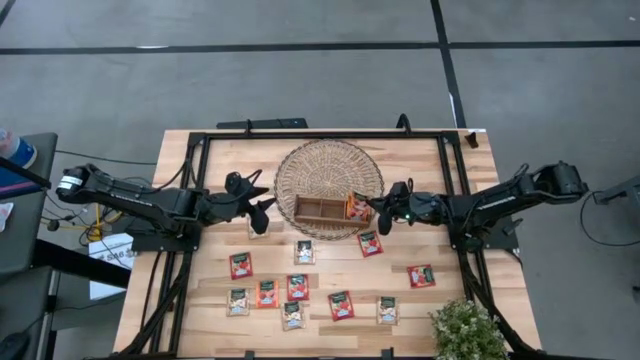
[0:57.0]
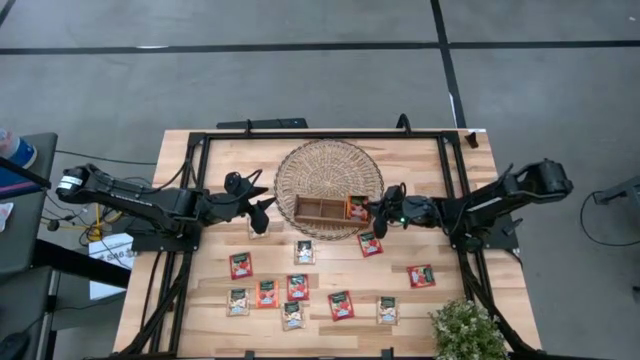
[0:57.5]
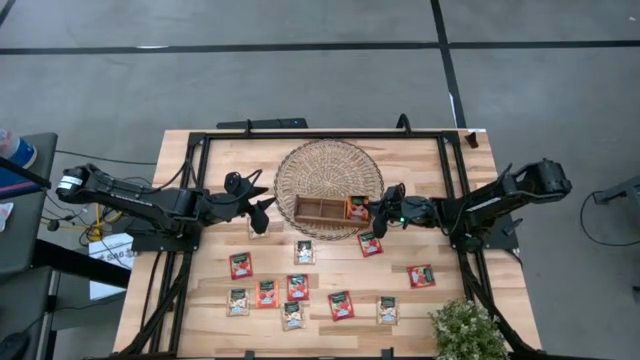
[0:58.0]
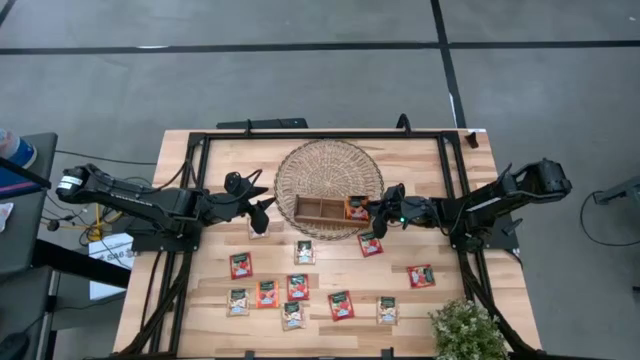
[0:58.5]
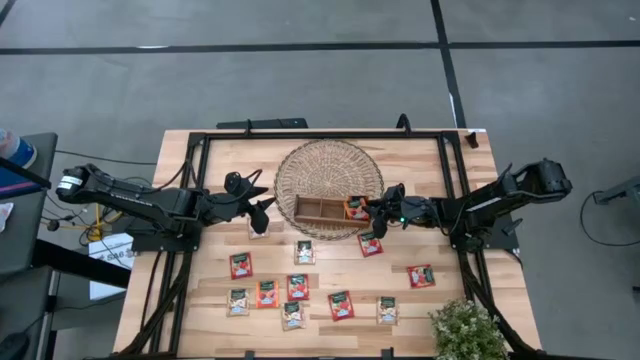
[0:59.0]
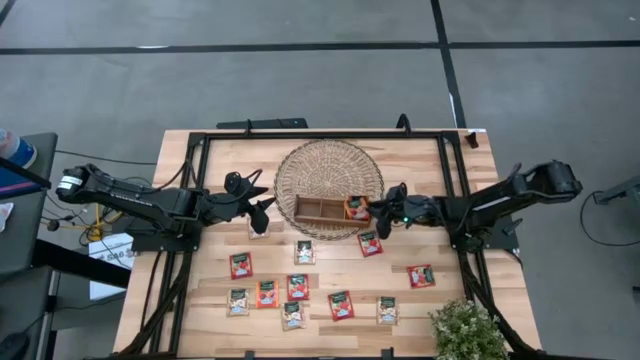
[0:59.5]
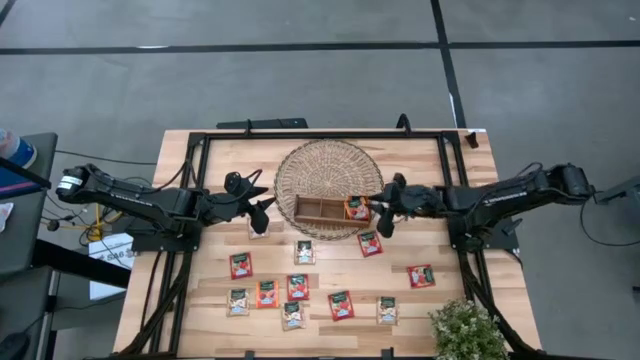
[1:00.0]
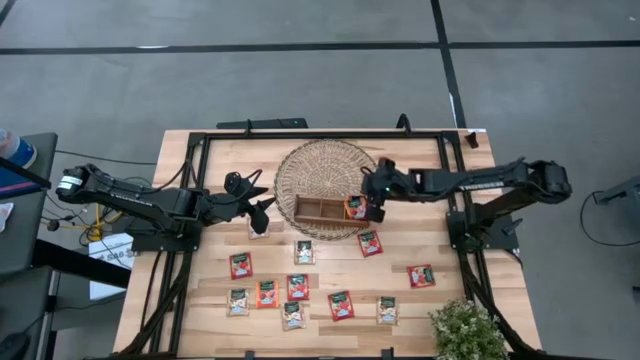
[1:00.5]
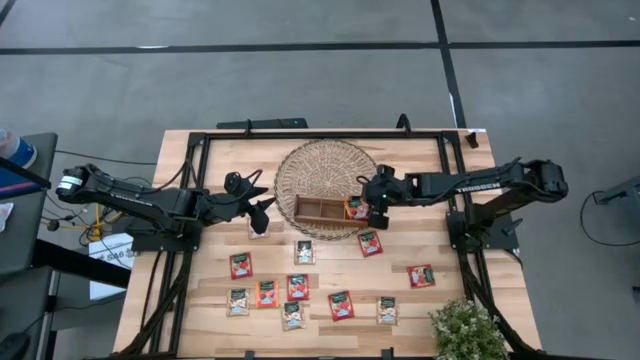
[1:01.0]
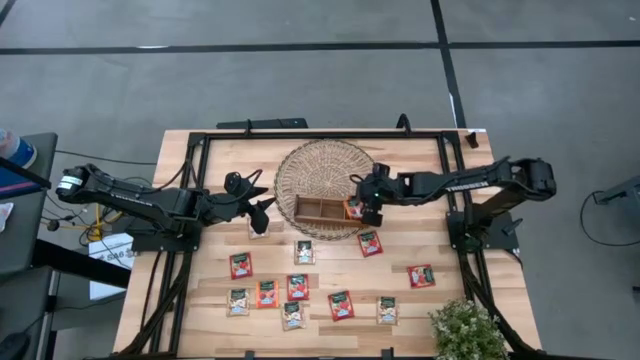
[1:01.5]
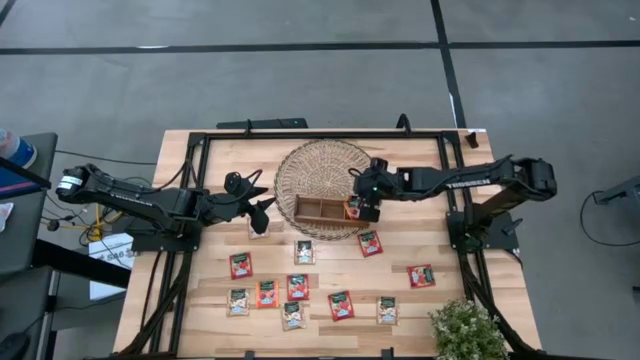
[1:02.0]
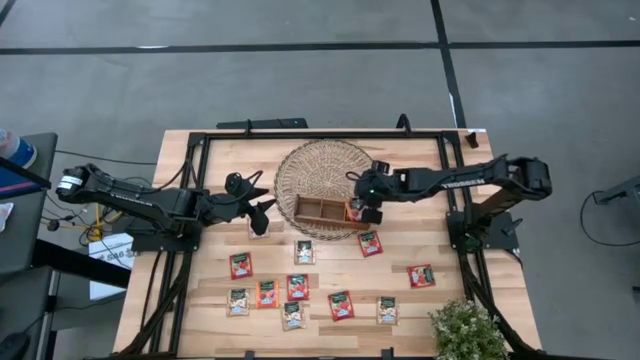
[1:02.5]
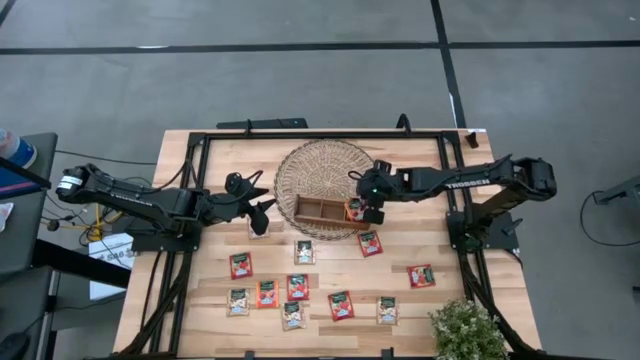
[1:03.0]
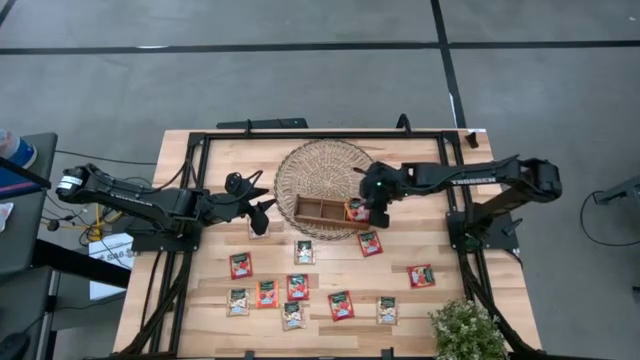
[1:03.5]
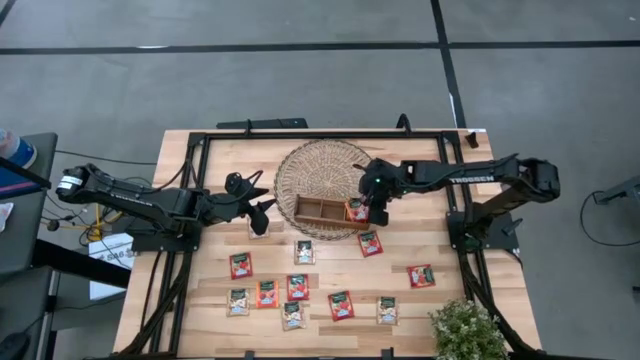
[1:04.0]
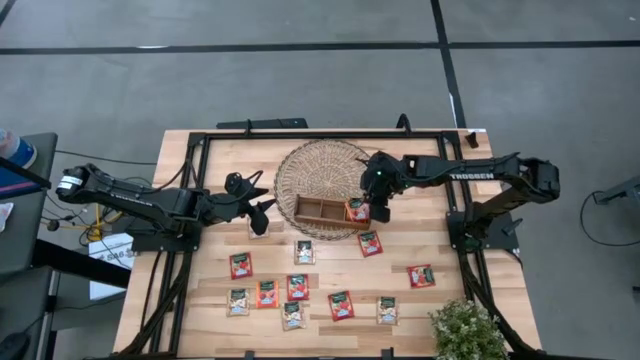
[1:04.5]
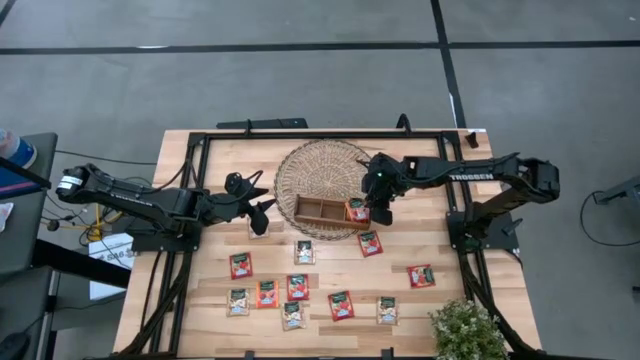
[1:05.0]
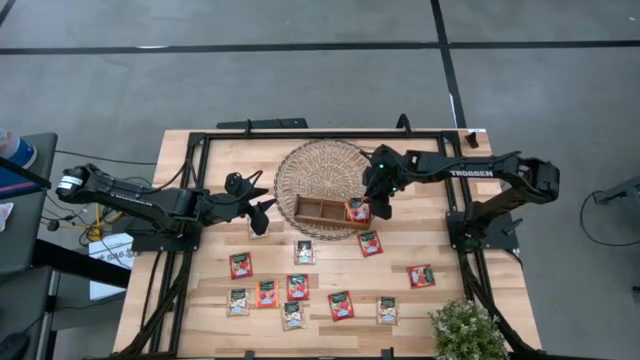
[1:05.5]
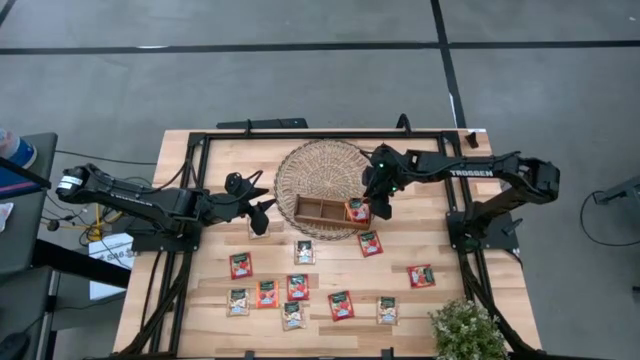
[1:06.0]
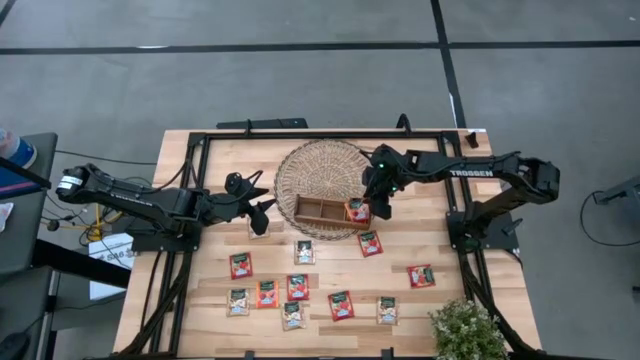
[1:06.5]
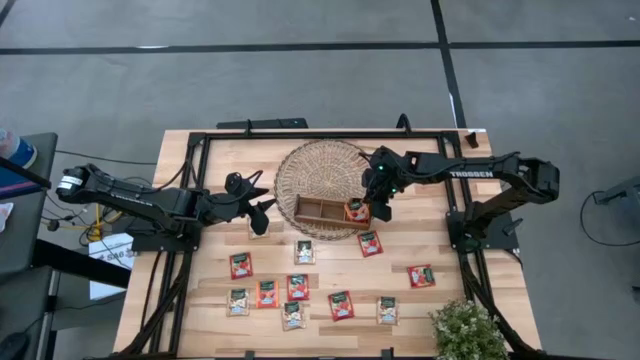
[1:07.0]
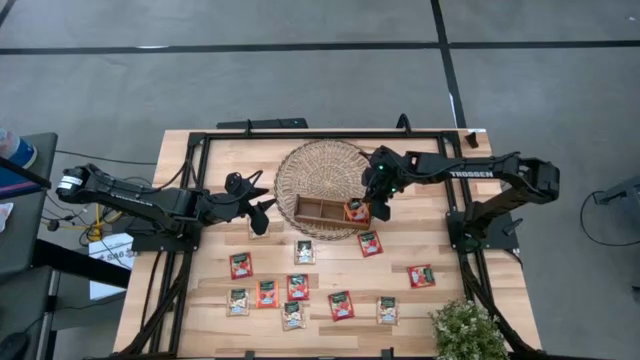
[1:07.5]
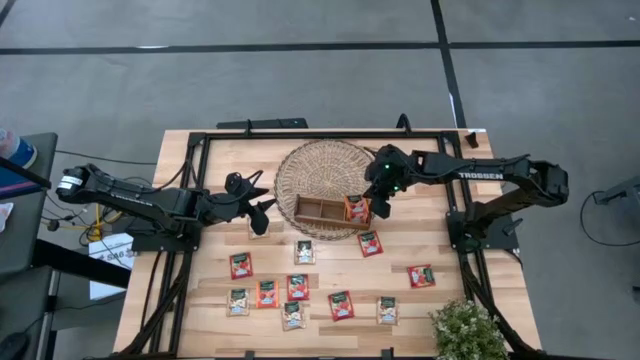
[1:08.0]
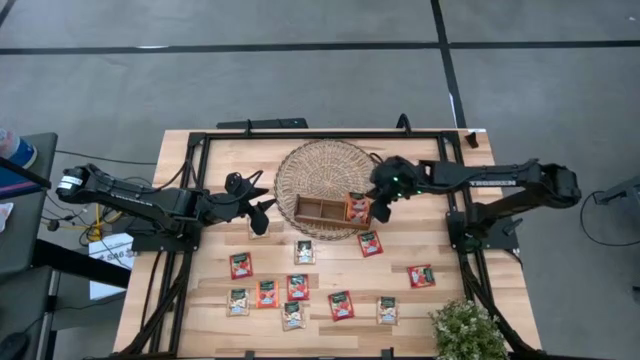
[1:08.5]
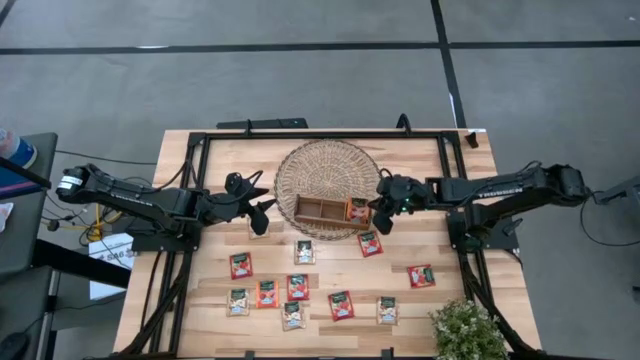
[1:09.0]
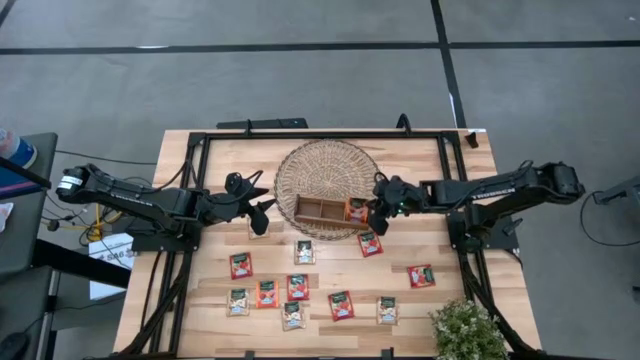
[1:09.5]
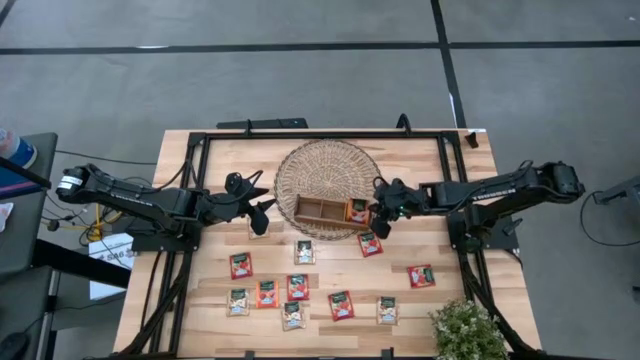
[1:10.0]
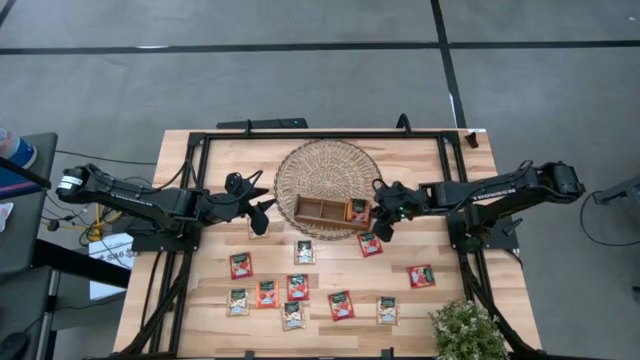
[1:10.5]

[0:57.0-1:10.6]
Task: Pick & Place Tea
Put the orange tea bag into the right section of the wooden organizer
